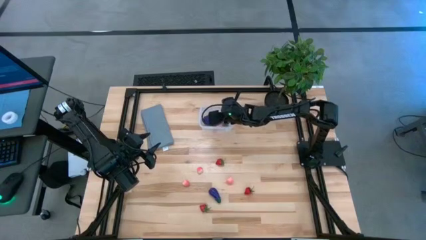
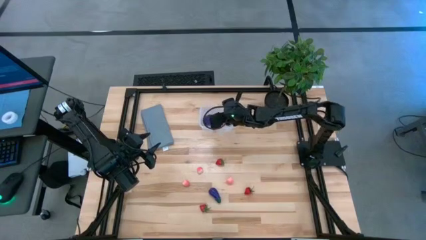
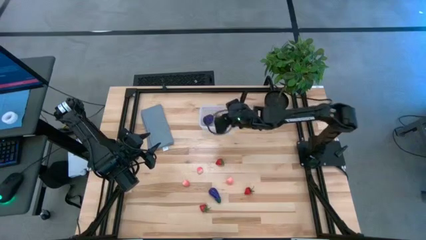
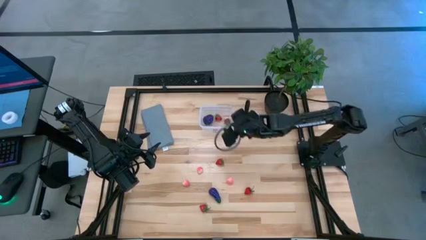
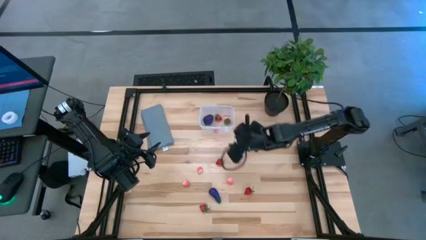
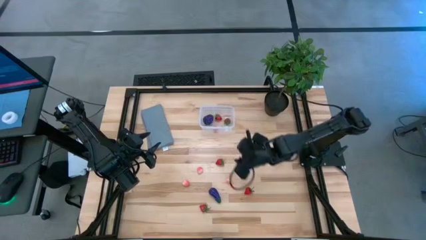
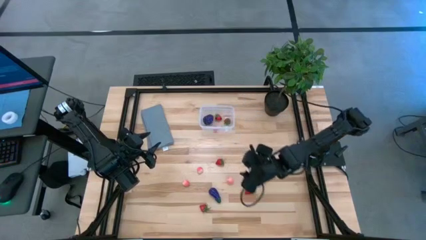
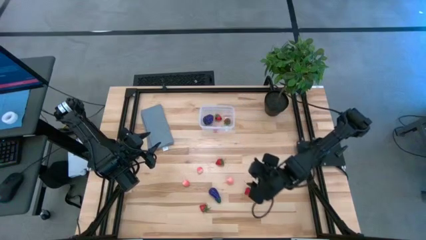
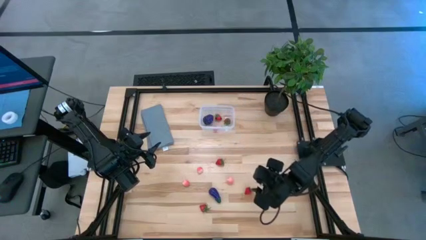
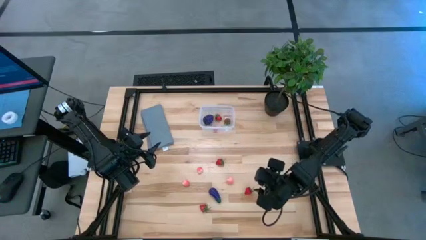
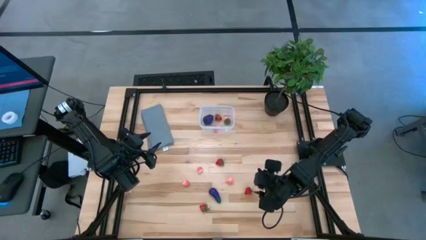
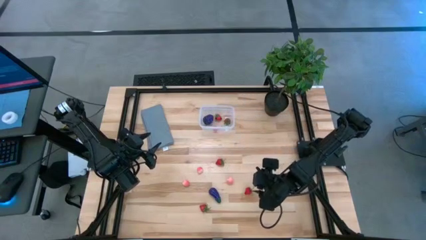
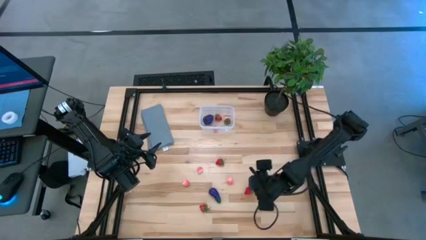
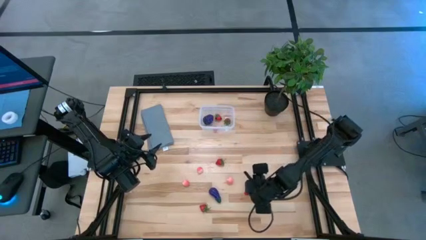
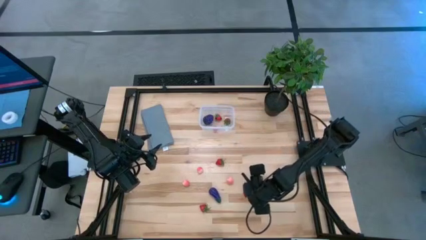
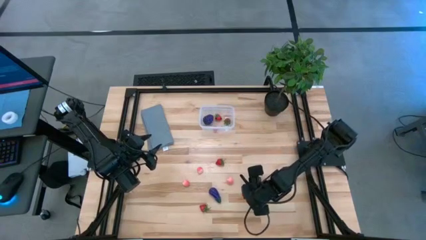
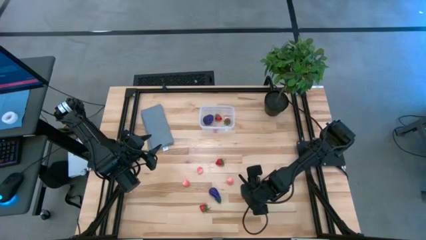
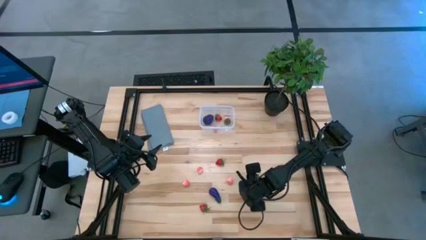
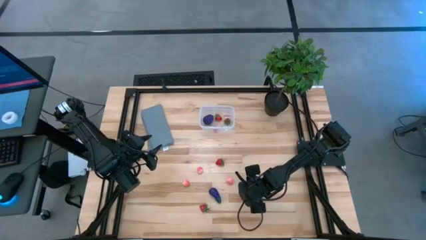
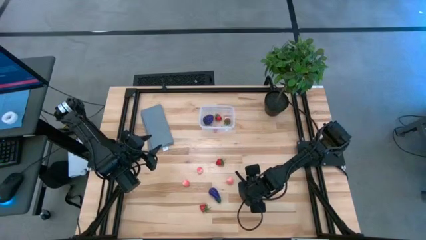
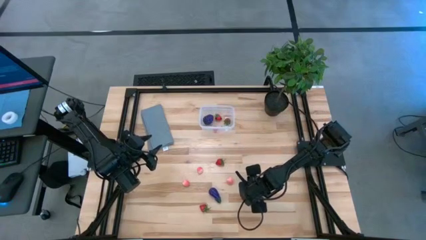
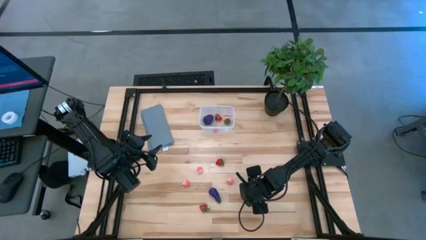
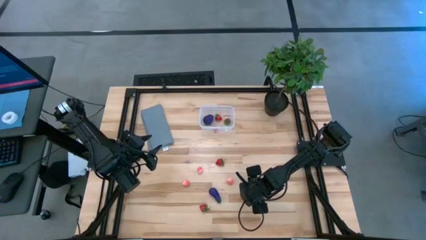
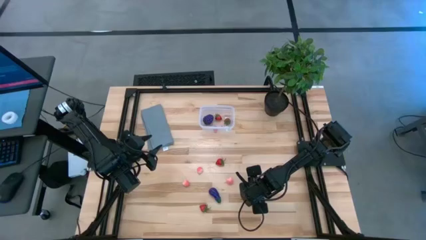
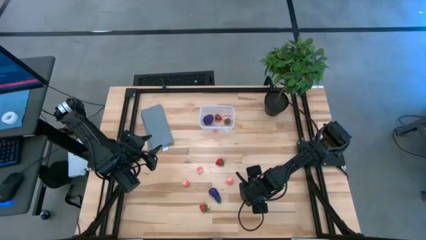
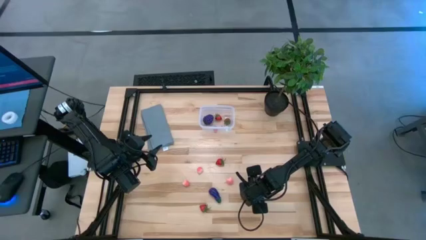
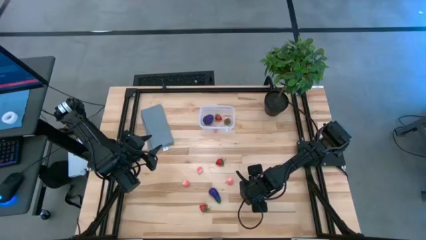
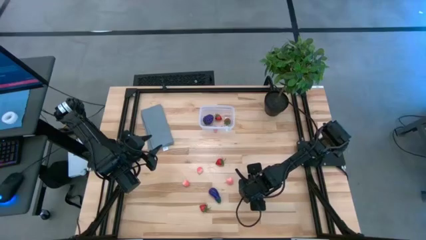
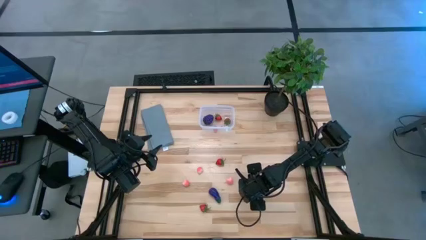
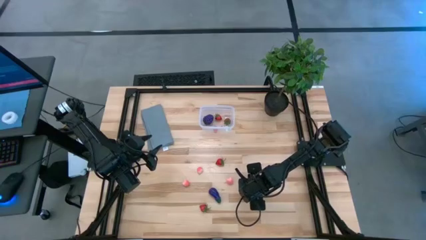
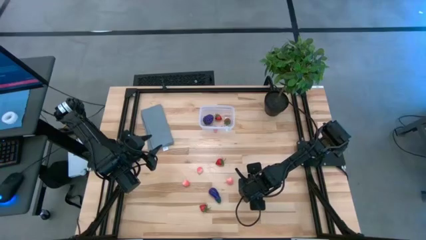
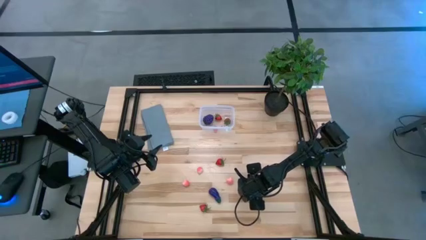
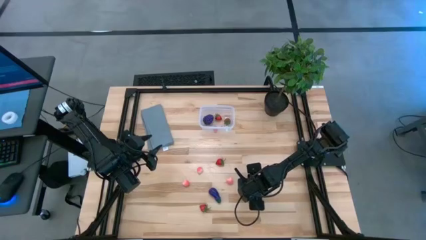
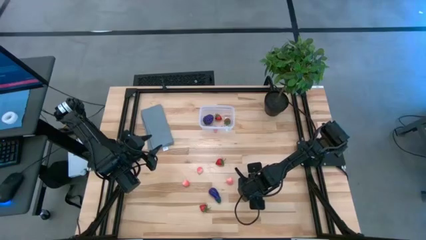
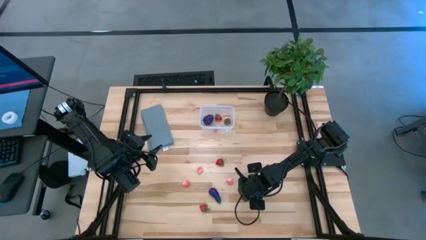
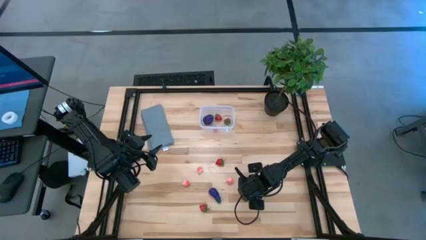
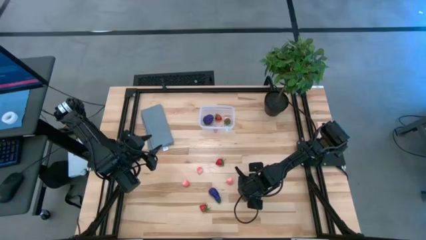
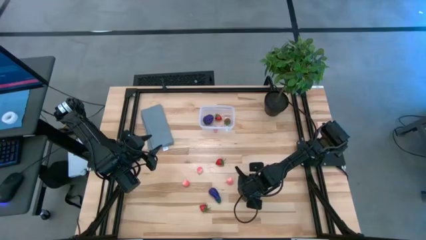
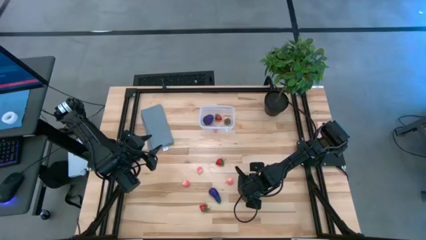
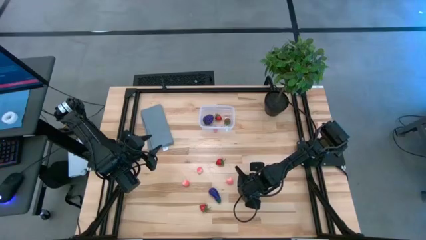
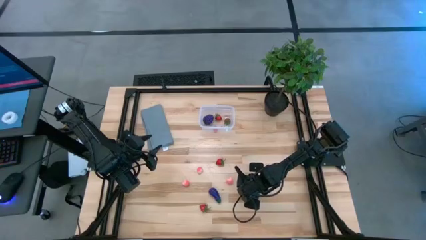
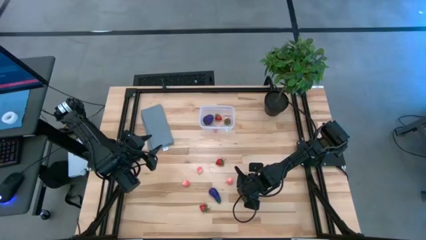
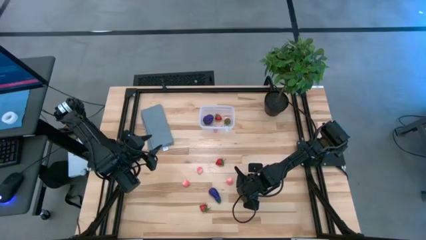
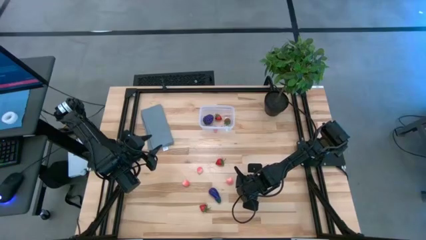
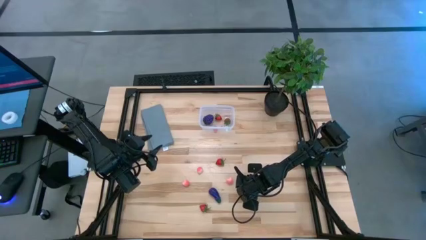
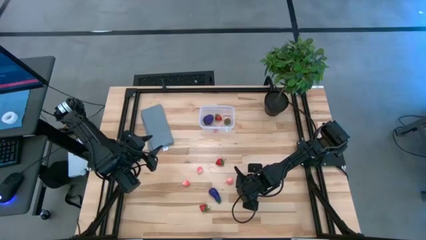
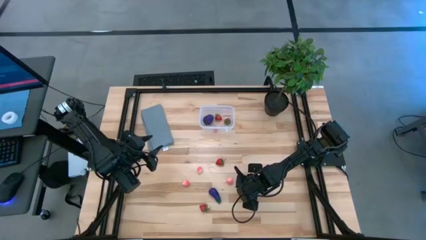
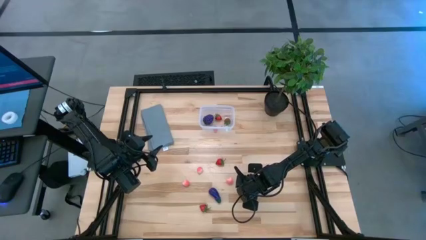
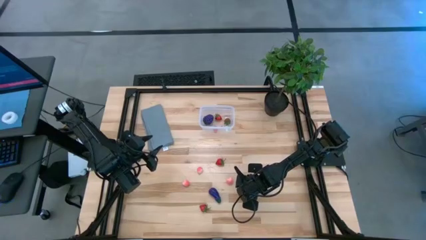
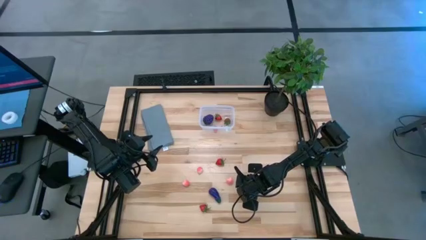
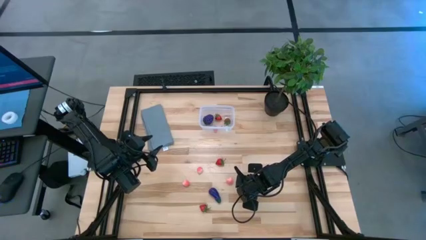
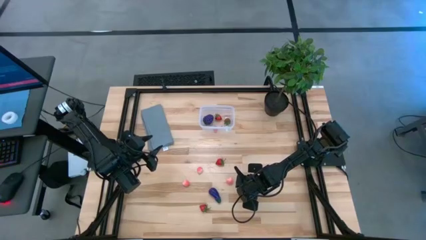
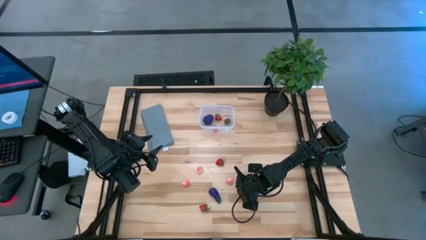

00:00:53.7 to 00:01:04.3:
Task: Pick and placing Produce into tupperware
Put the strawberry into the transparent bin

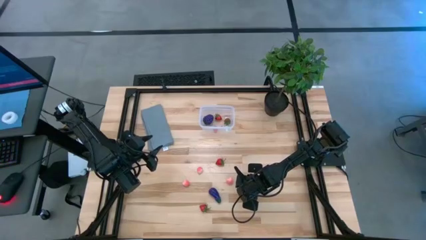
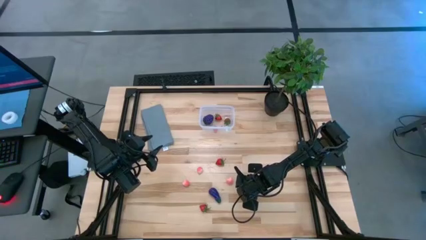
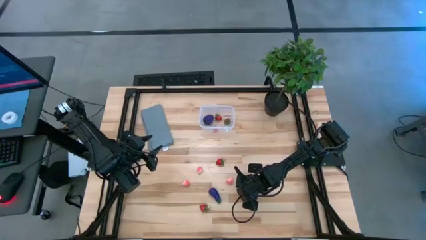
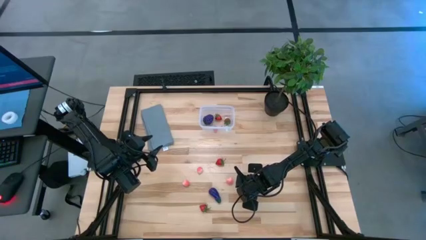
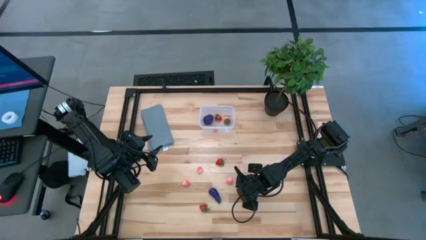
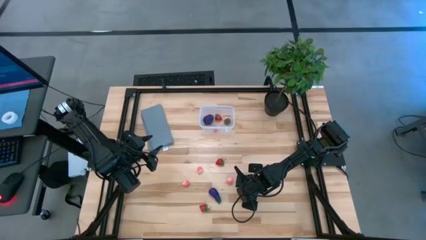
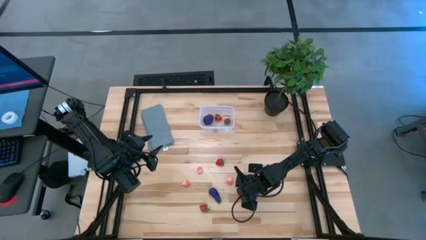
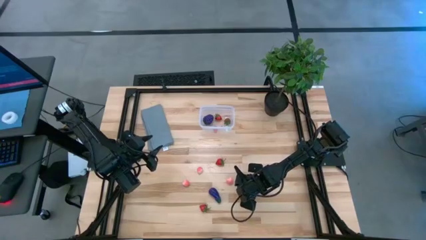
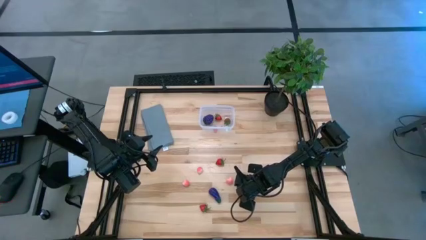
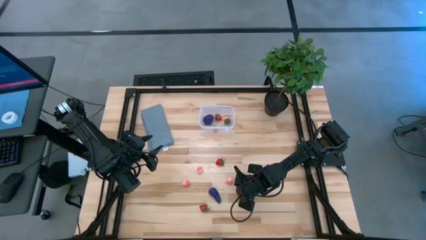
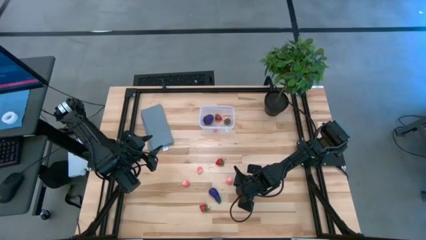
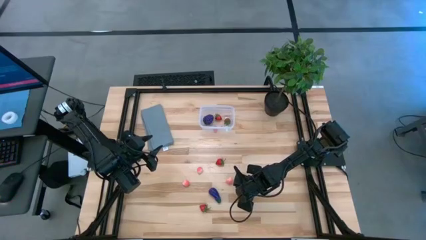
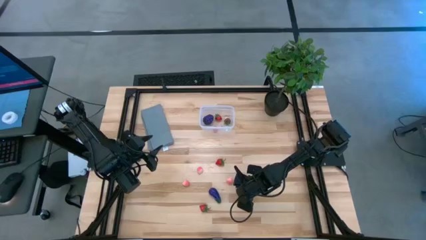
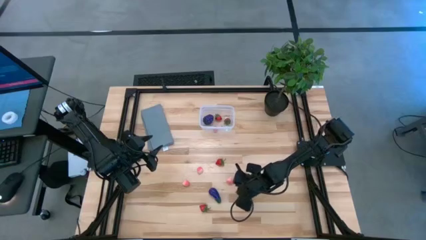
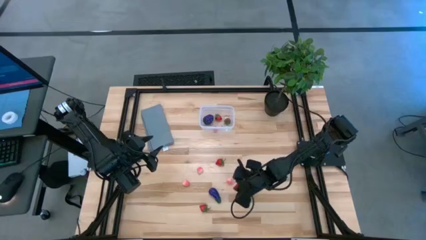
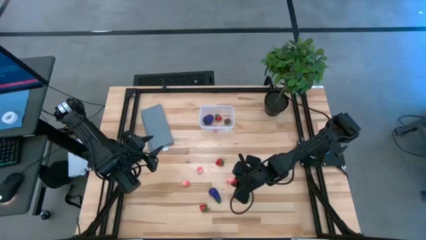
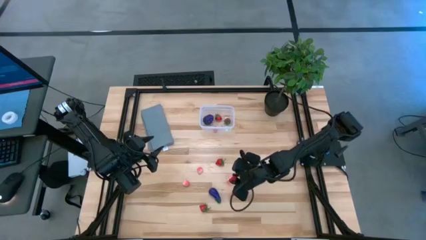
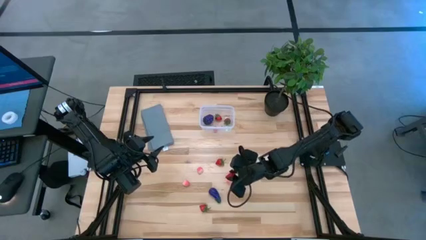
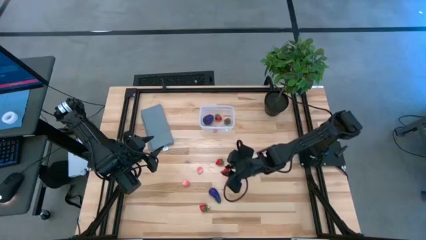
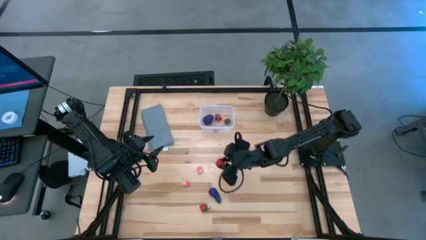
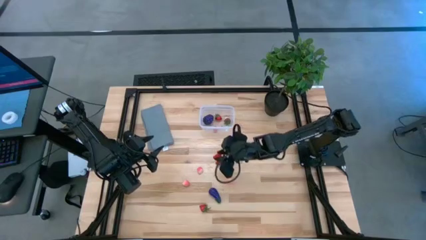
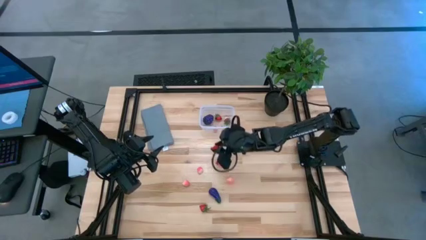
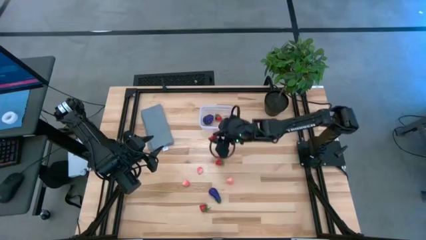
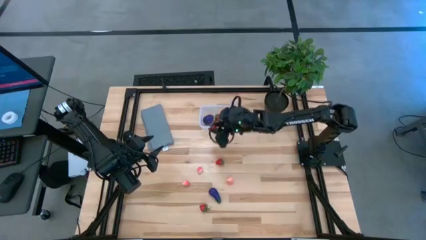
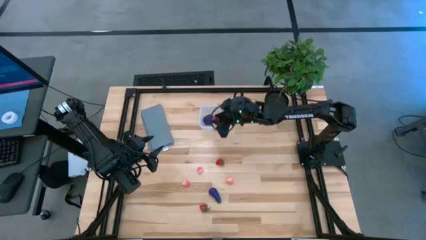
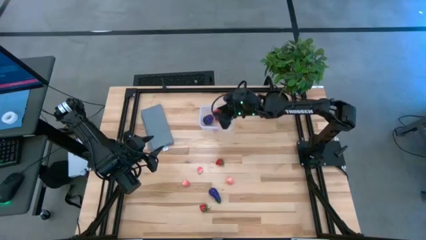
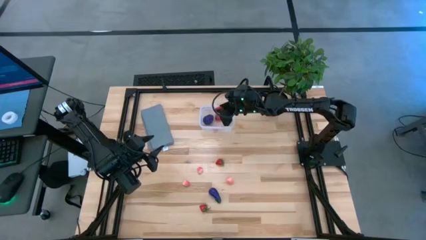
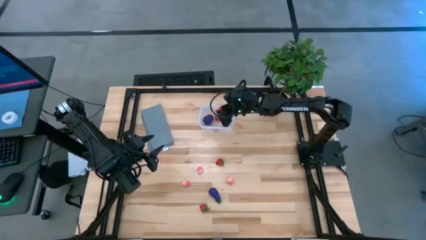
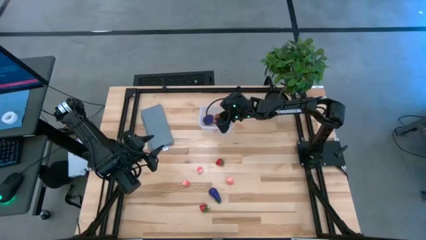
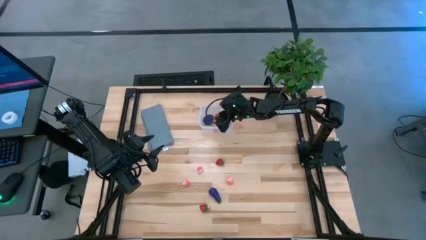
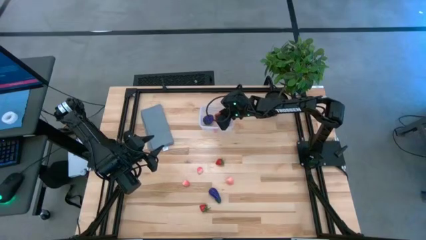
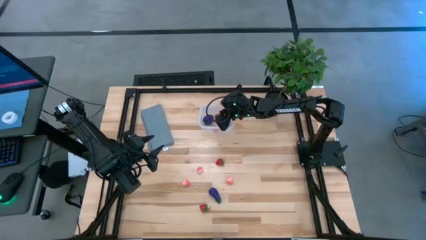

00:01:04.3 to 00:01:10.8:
Put the strawberry into the transparent bin

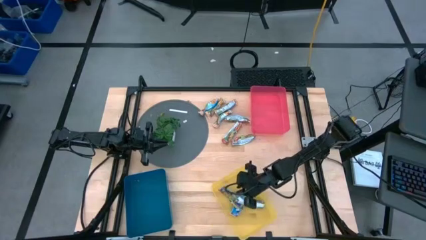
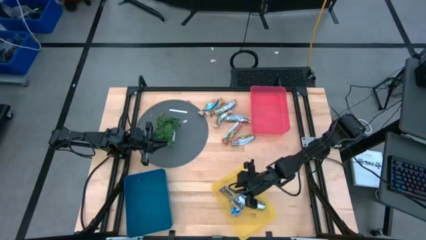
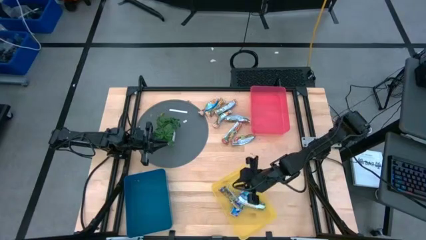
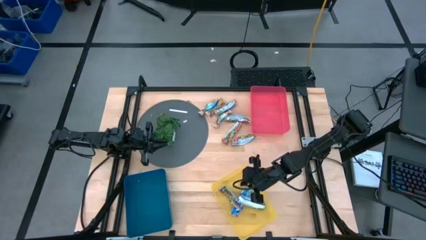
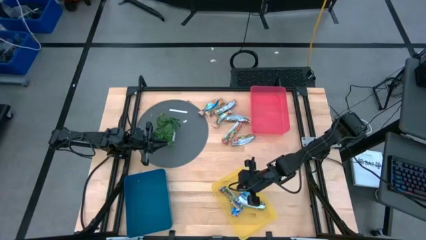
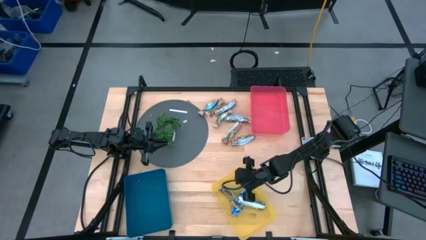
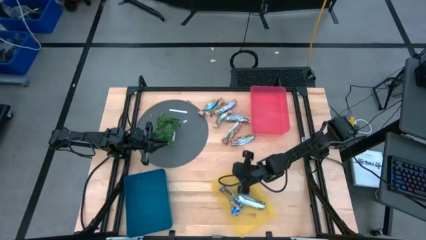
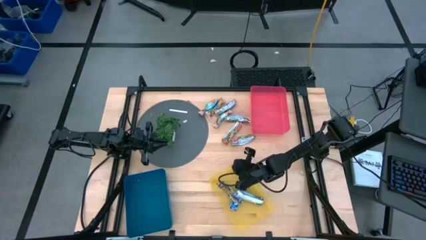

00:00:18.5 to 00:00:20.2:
Task: Pick and place Granola Bars by type
Adjust the yellow bin
